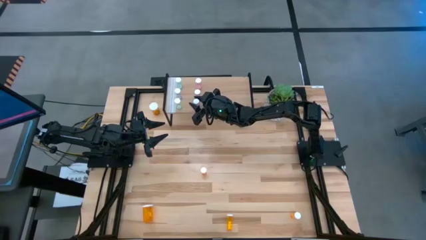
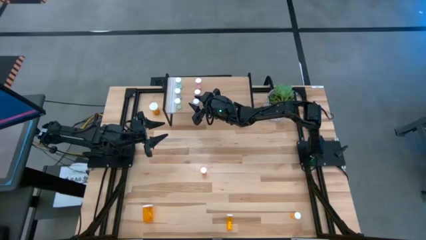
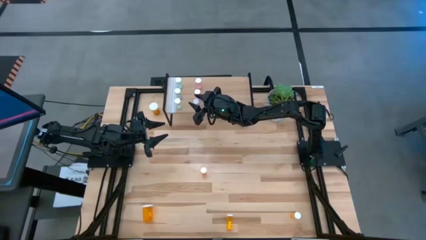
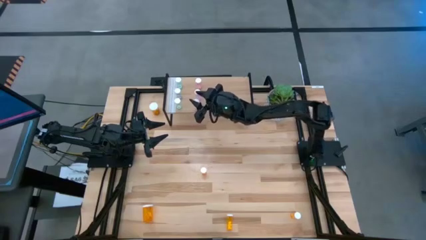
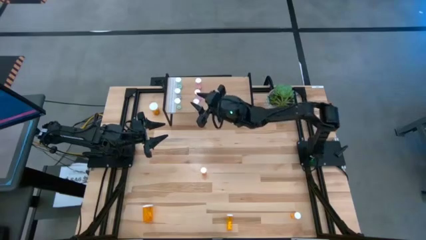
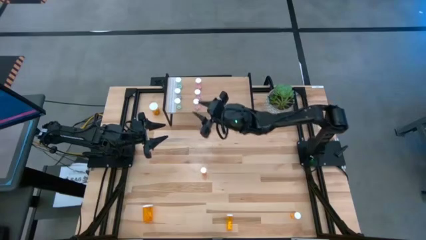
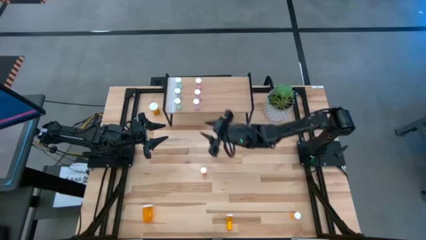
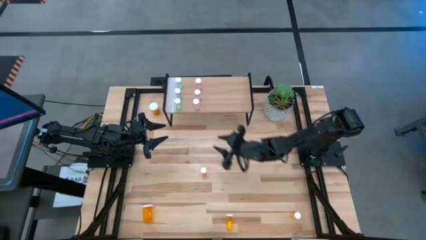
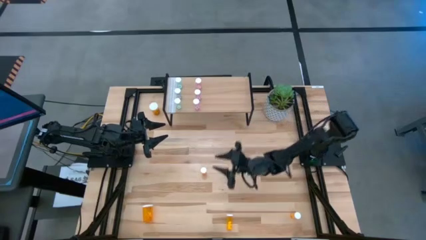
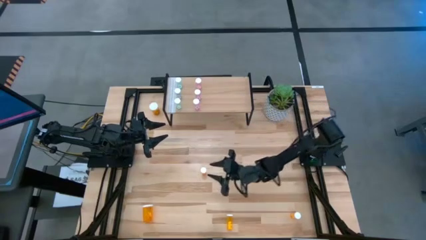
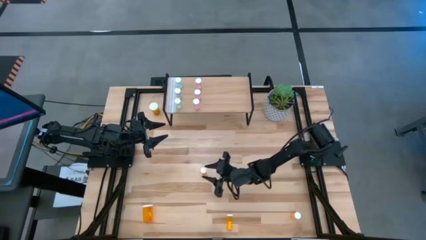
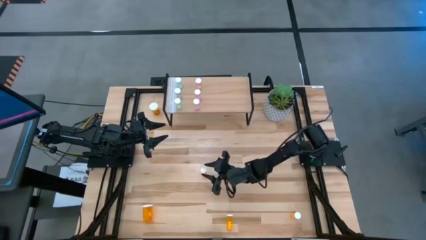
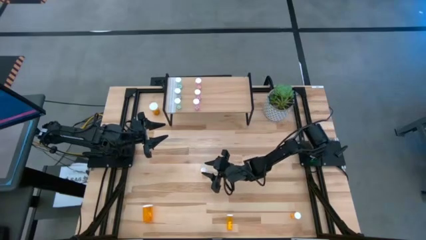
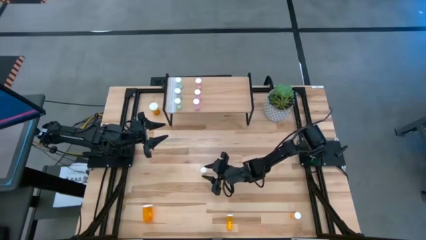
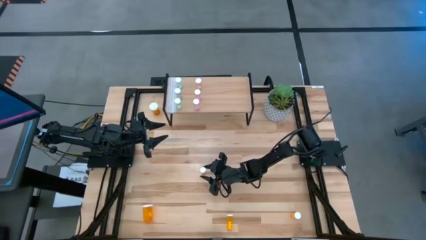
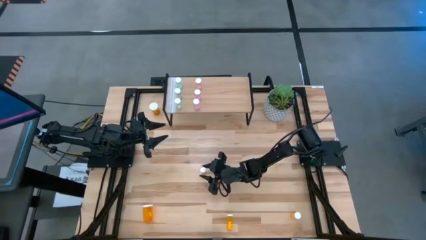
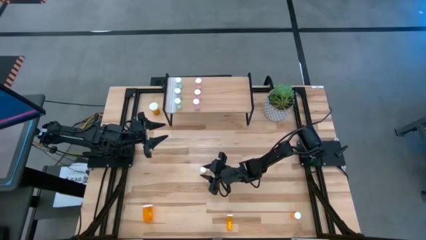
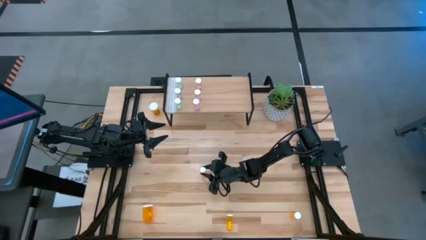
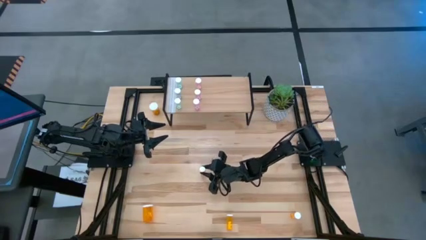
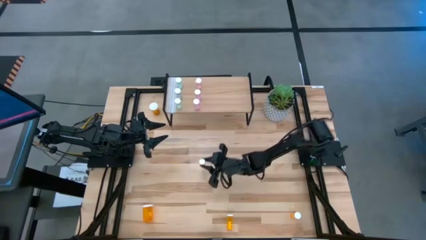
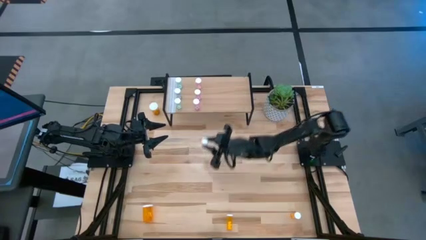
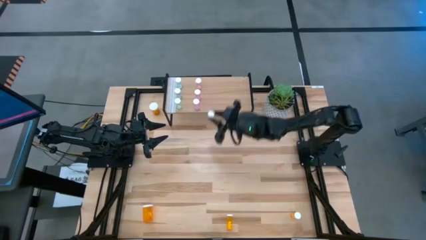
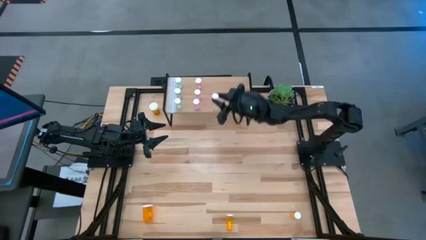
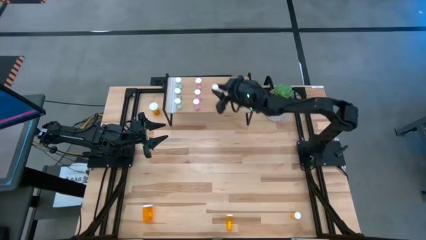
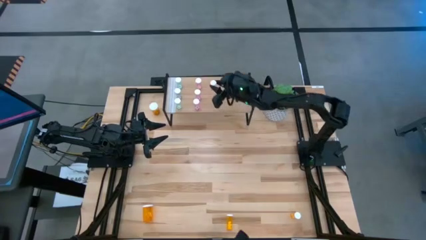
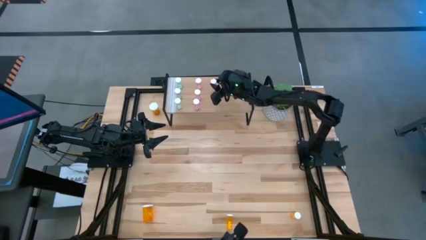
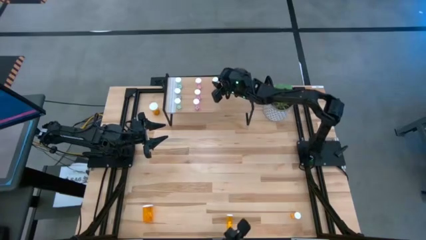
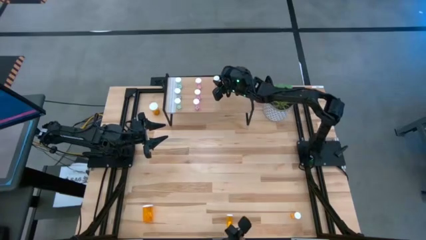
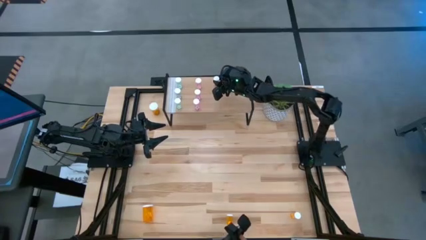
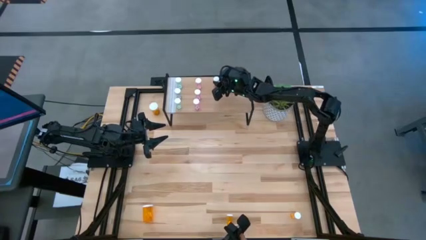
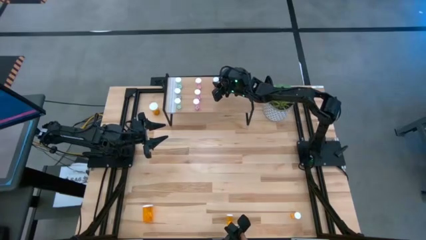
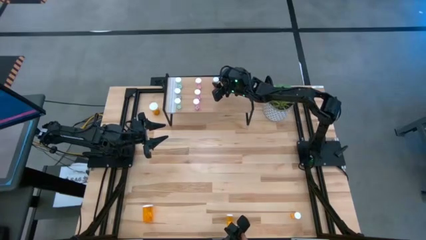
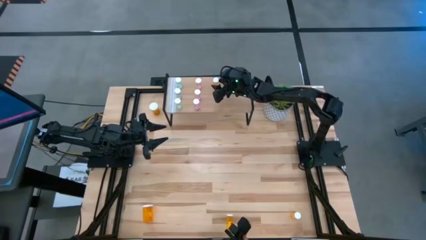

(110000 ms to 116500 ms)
Task: Pick and place medicine bottles onto shelf by color
Put the top small orange pill bottle on the shelf

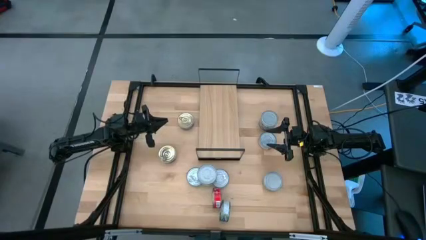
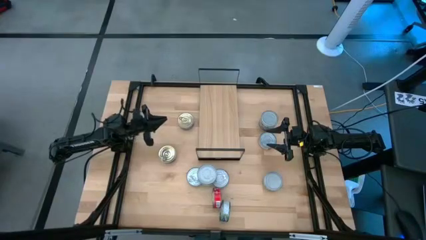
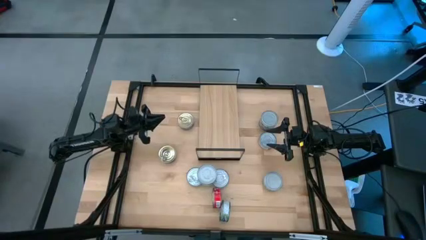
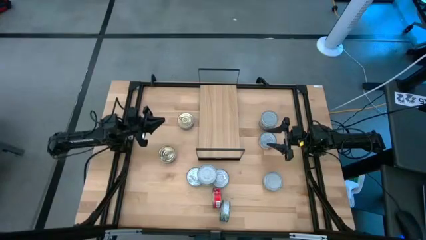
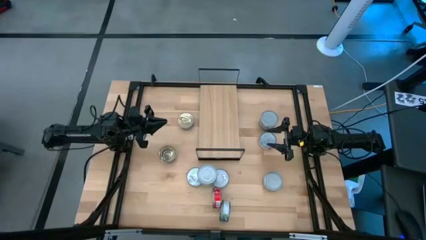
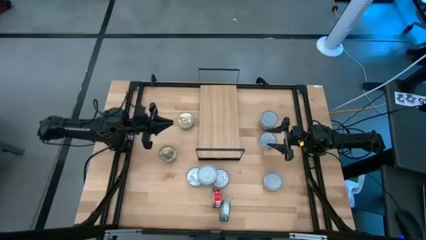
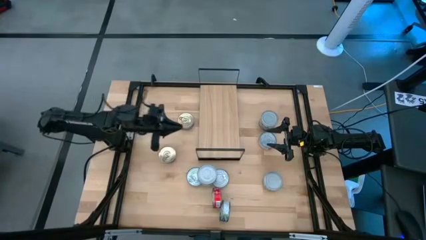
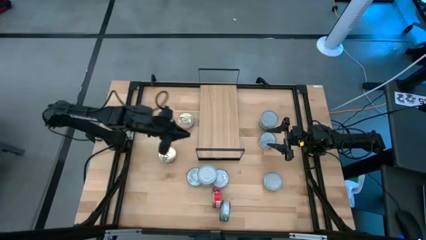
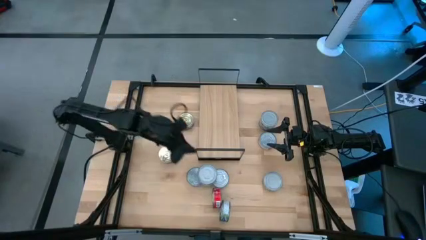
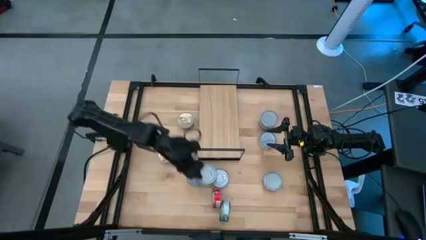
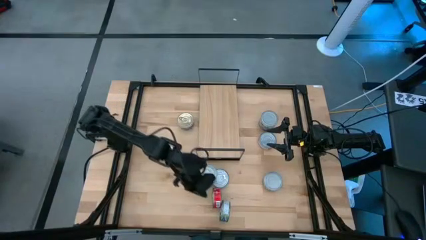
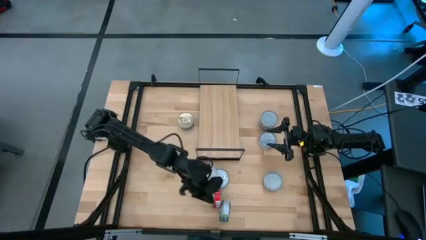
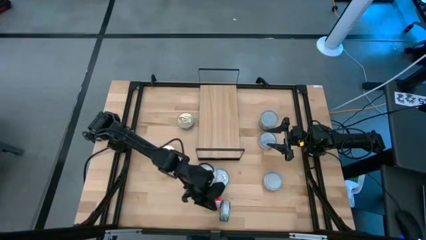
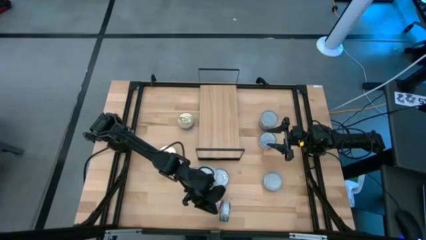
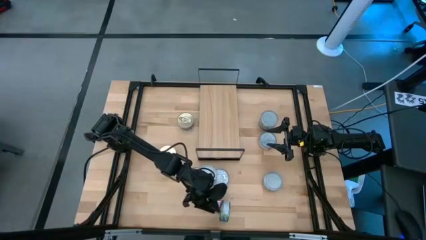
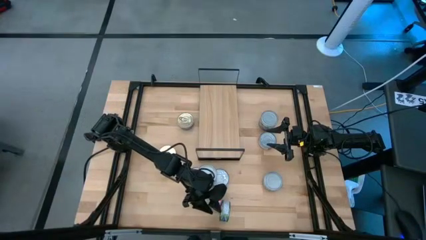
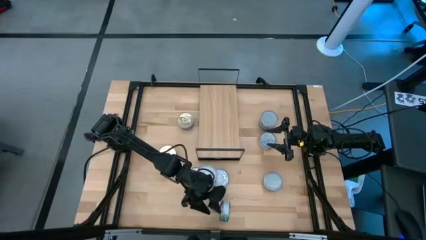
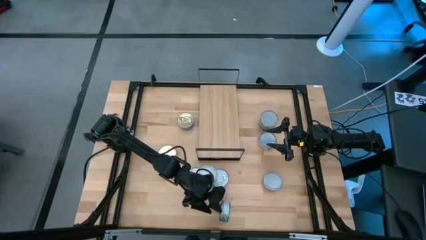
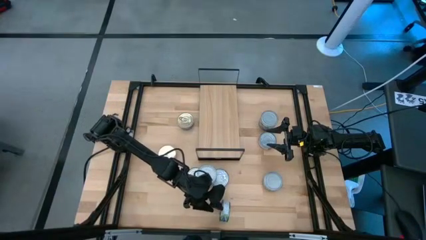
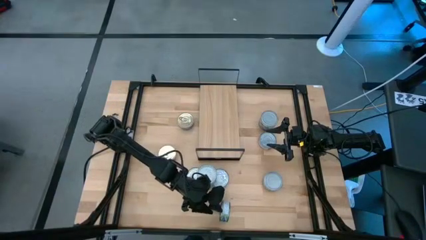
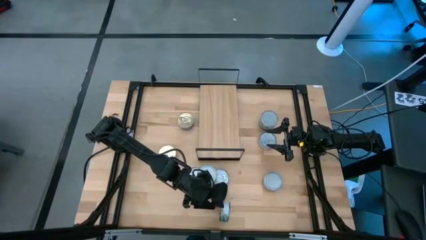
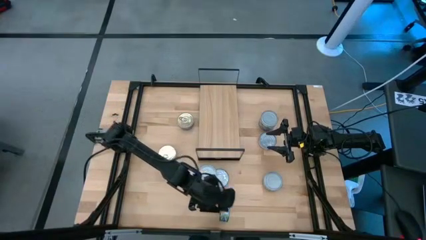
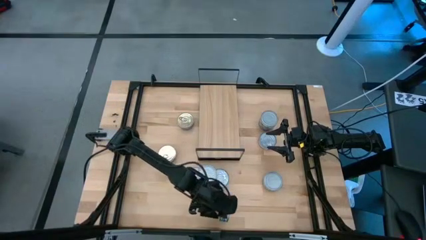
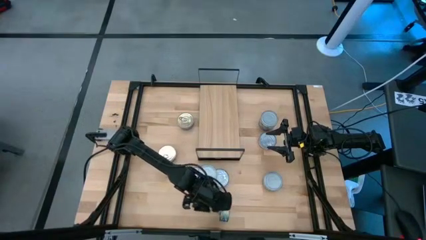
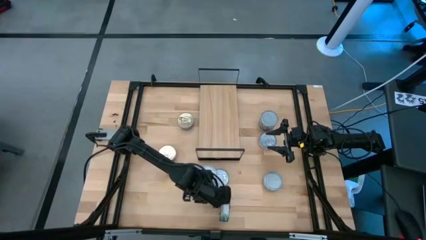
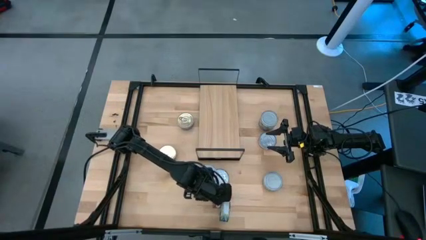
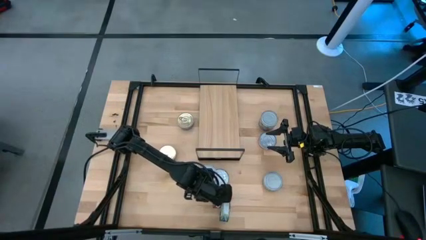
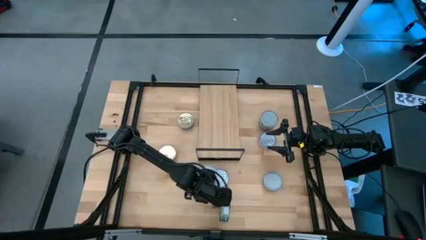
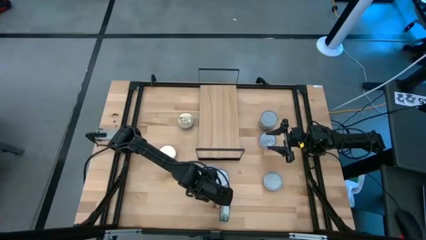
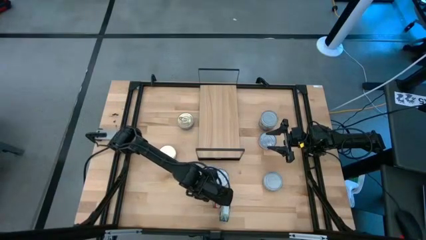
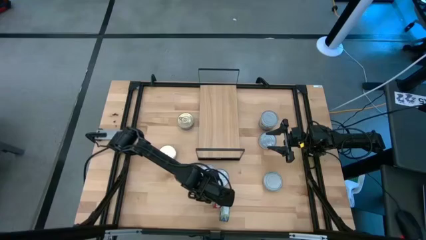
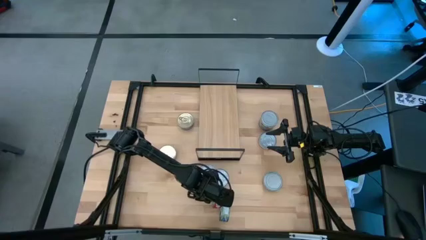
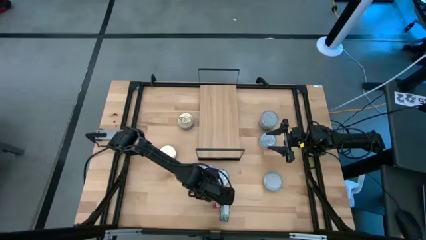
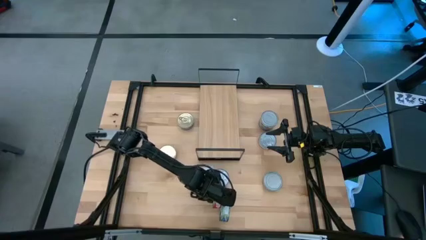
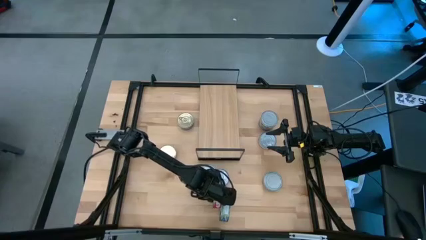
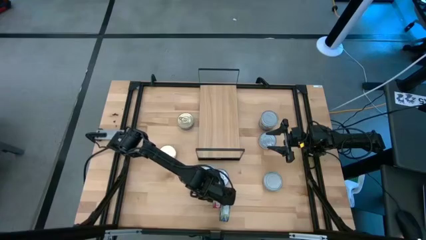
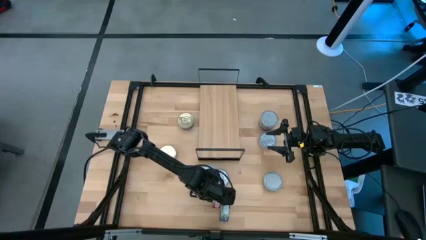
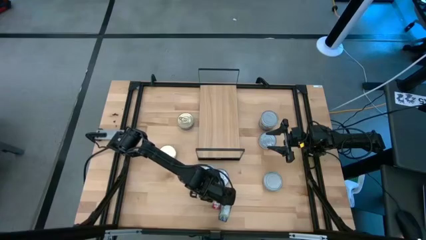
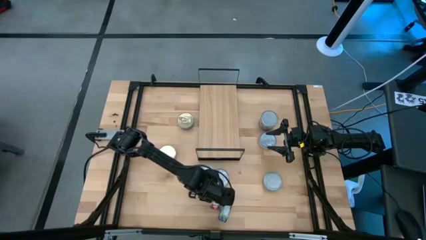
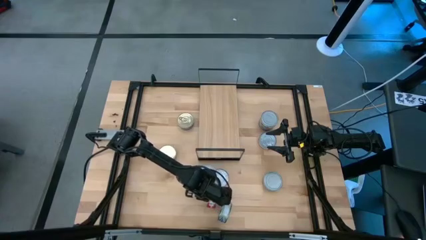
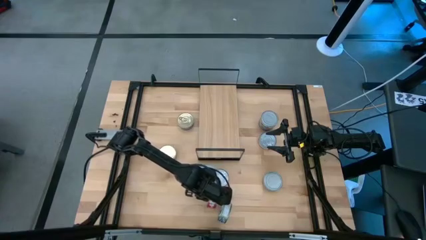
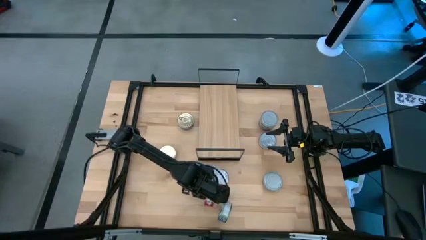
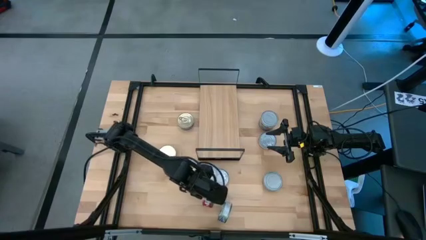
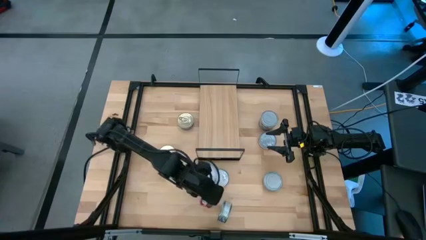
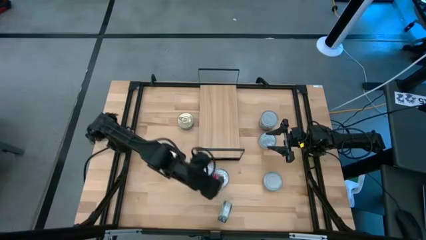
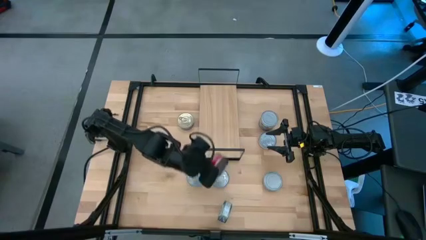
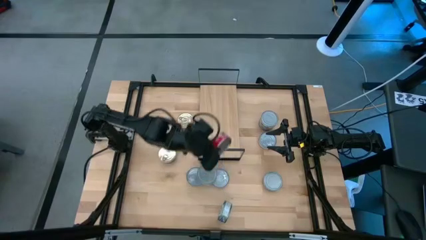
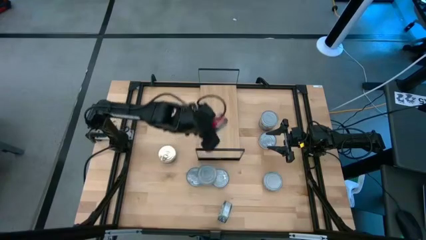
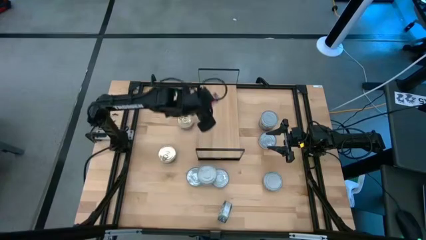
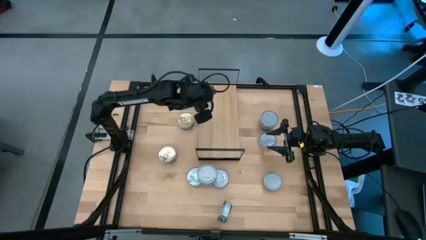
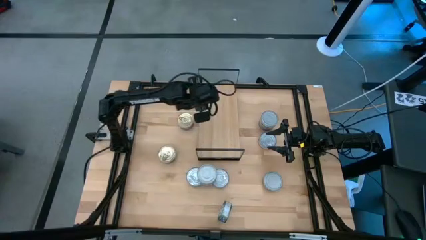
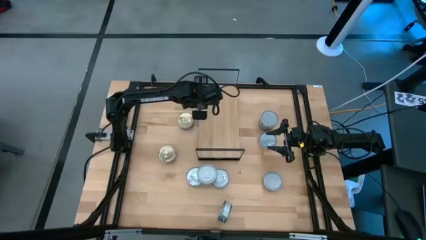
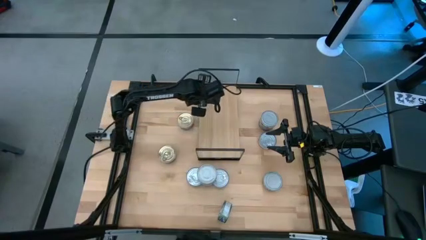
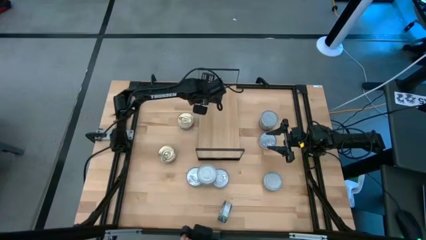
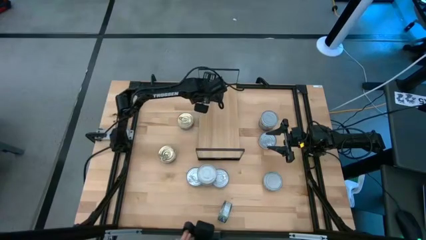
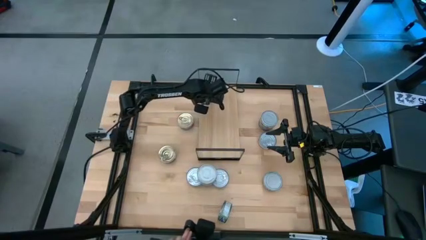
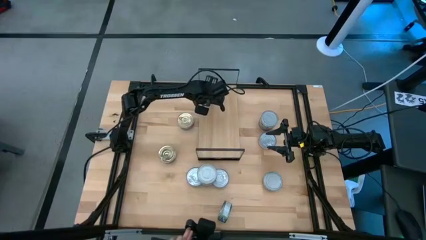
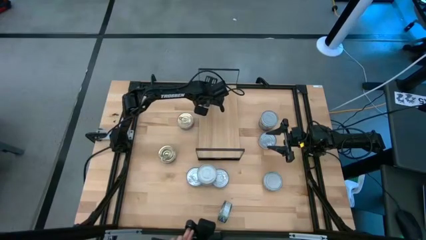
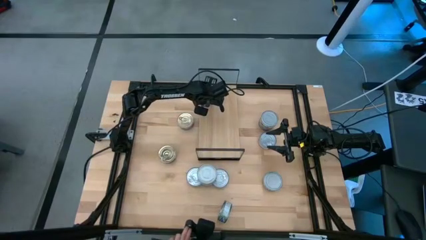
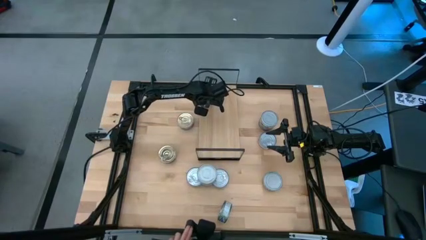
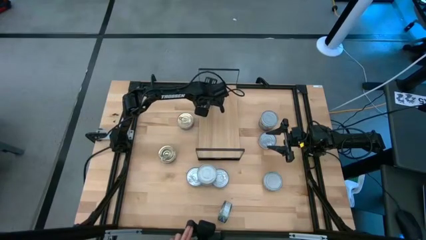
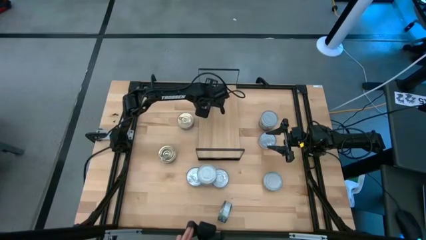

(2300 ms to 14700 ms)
Task: Stack canned seafood by type on shelf
Put the red tuna can on the shelf
